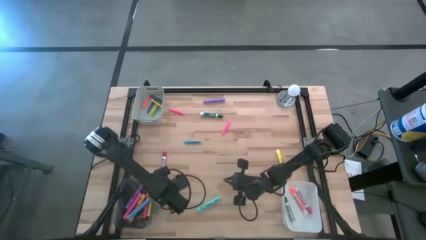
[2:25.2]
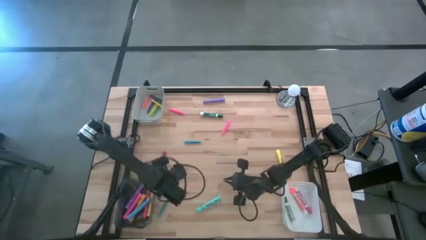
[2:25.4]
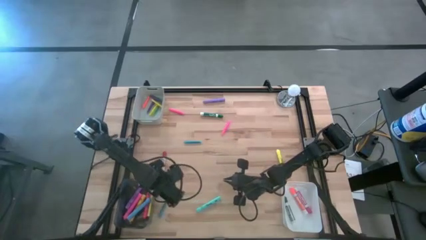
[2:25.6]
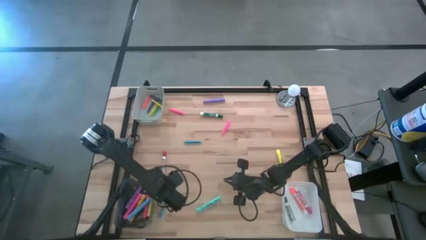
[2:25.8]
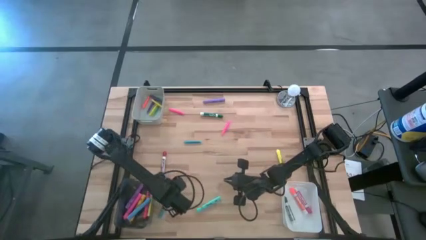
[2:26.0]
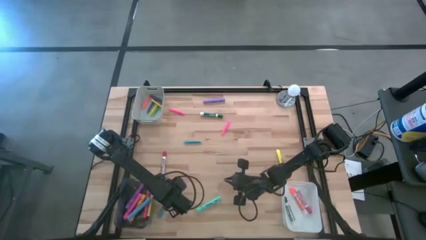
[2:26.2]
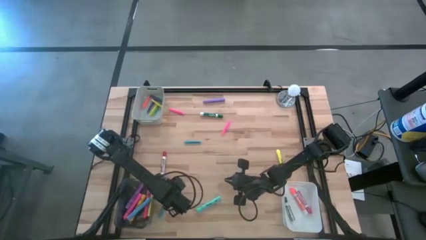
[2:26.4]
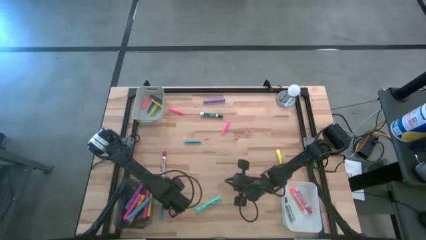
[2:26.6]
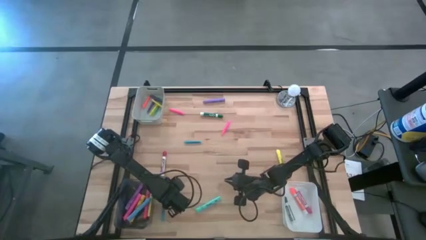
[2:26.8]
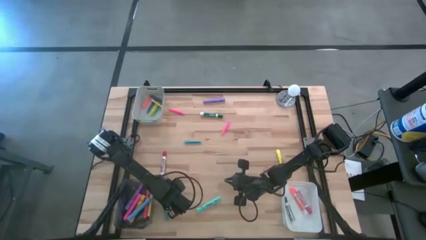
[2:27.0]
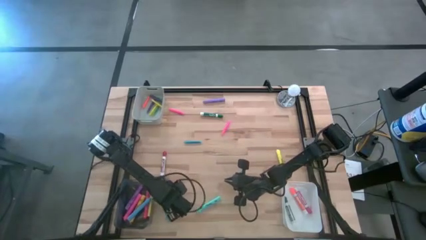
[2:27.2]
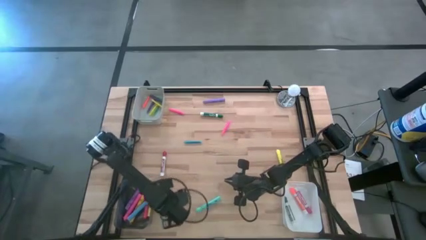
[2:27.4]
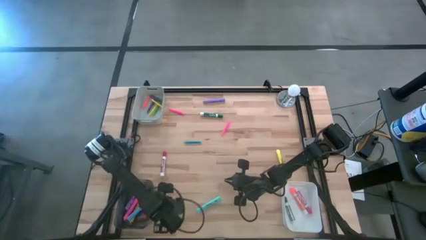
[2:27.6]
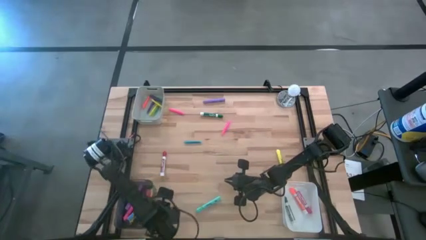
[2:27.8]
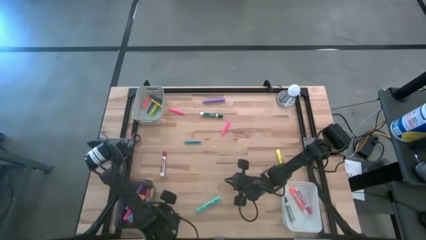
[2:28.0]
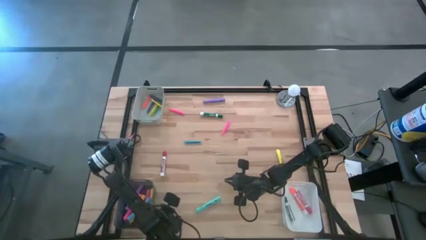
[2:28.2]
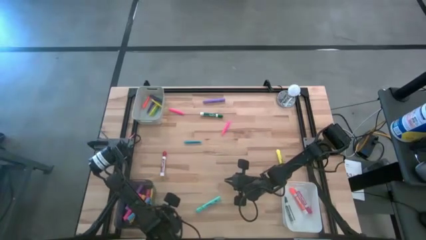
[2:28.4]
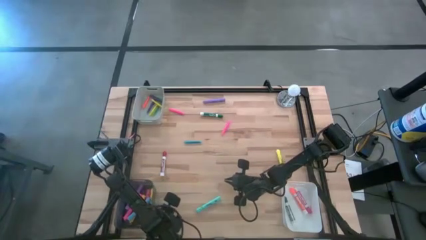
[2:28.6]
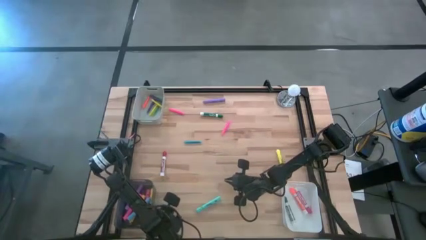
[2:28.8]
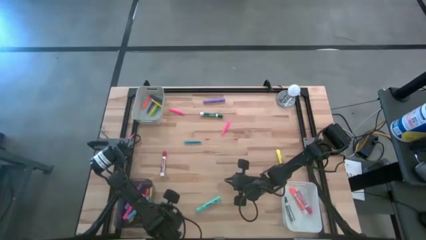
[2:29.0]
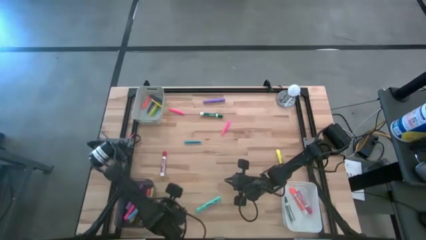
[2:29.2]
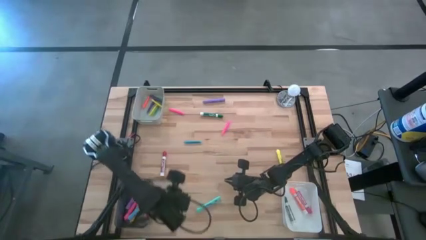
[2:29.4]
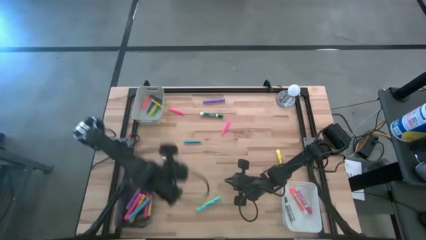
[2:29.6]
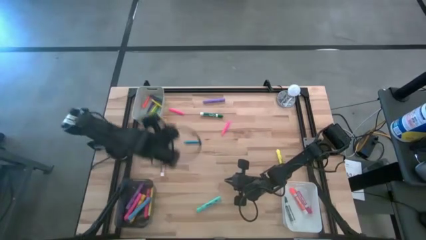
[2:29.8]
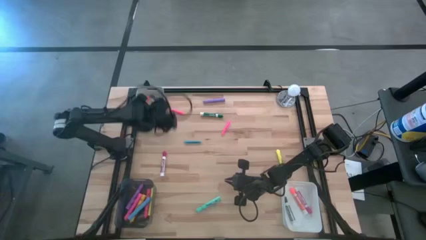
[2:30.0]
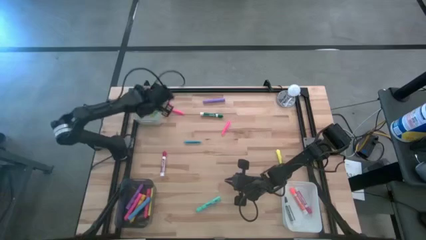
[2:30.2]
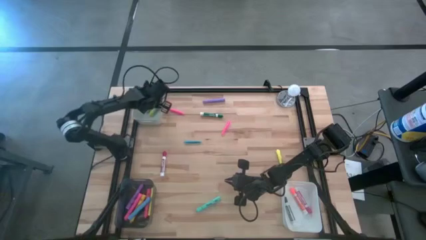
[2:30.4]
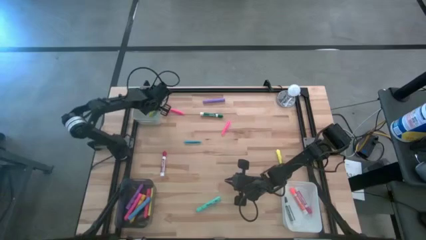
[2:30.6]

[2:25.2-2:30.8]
Task: Pick & Place Markers
Put the bottom blue pen into the gray bin

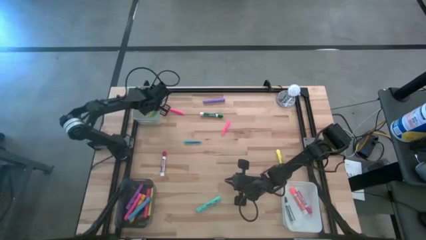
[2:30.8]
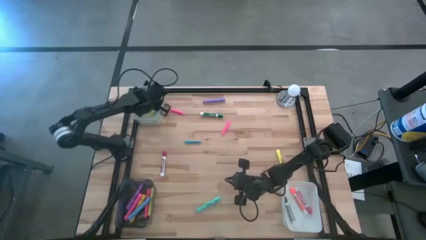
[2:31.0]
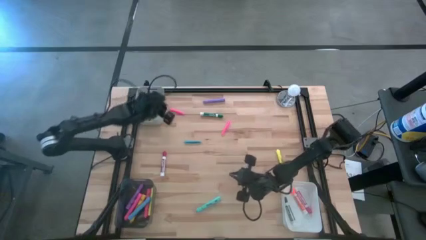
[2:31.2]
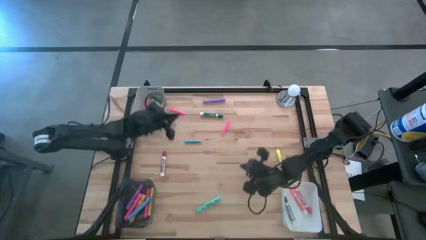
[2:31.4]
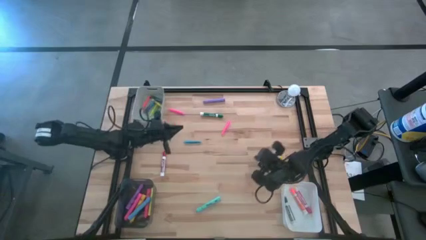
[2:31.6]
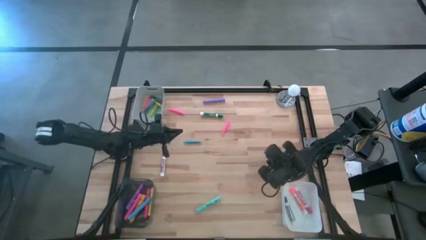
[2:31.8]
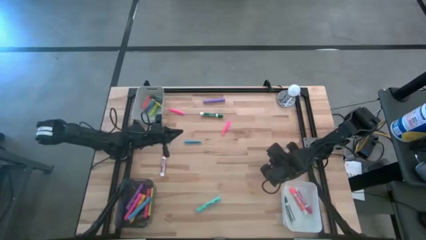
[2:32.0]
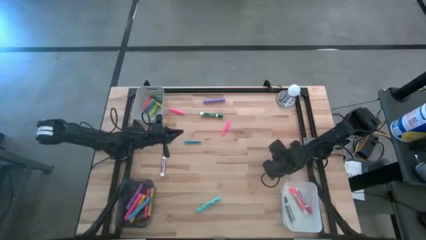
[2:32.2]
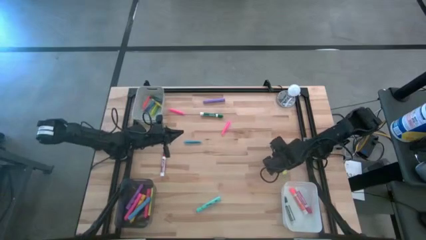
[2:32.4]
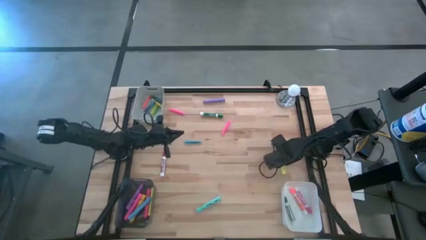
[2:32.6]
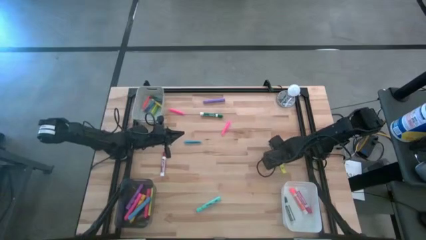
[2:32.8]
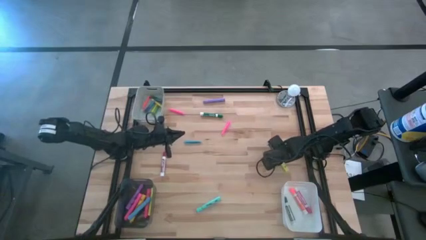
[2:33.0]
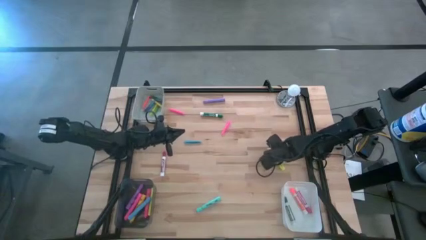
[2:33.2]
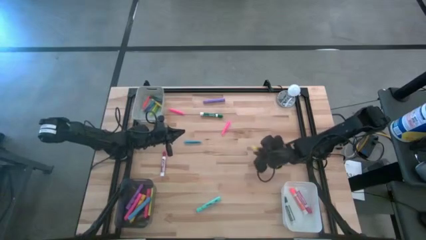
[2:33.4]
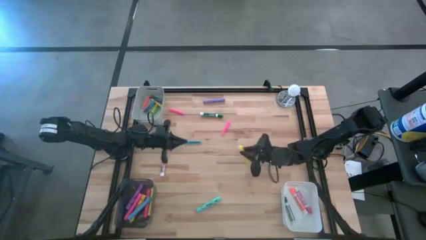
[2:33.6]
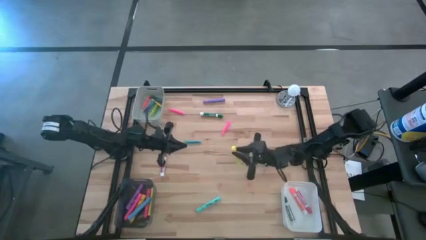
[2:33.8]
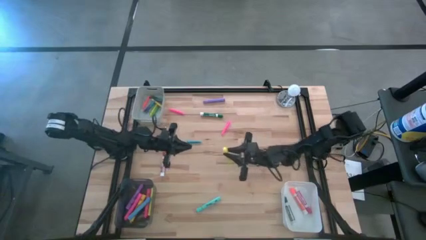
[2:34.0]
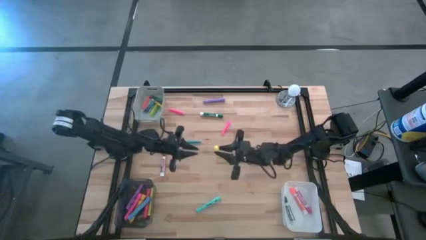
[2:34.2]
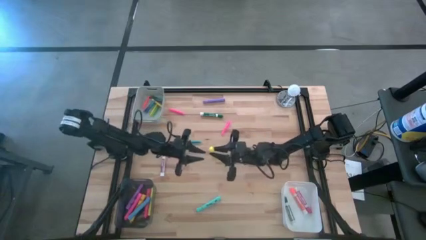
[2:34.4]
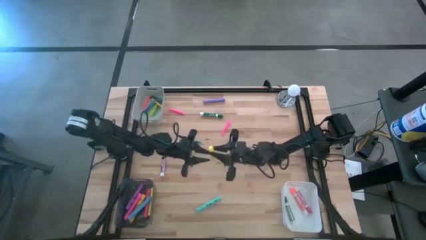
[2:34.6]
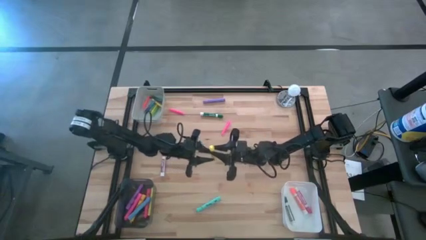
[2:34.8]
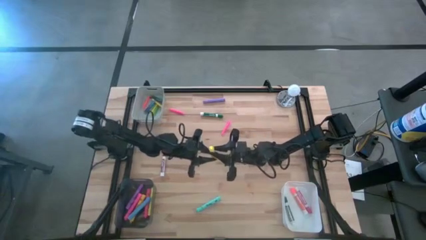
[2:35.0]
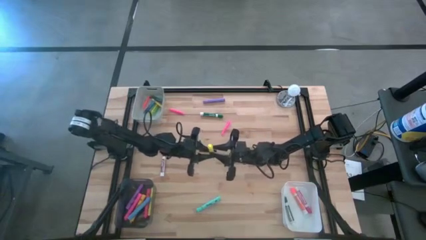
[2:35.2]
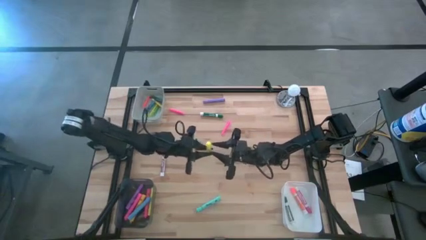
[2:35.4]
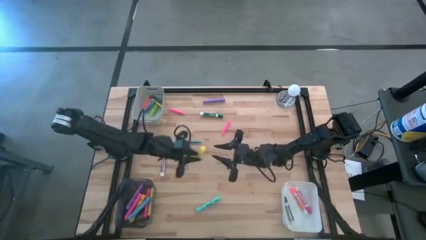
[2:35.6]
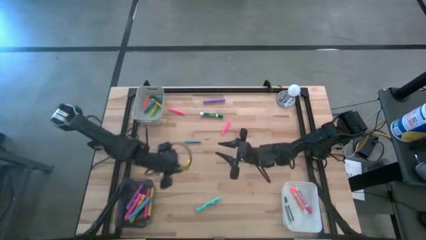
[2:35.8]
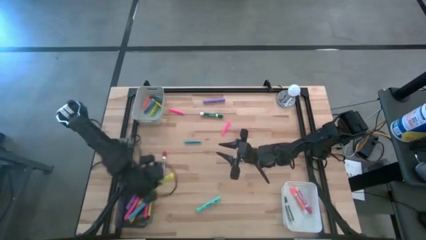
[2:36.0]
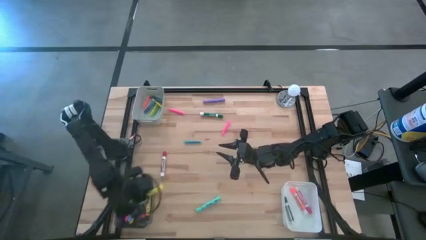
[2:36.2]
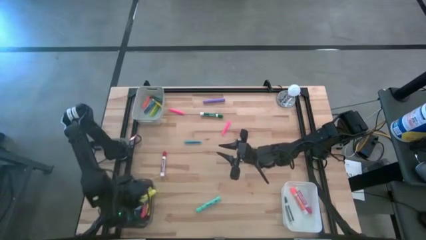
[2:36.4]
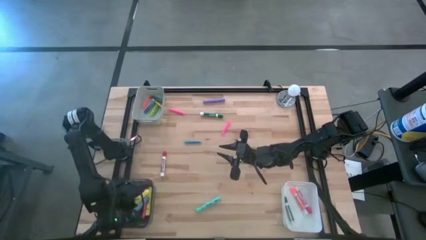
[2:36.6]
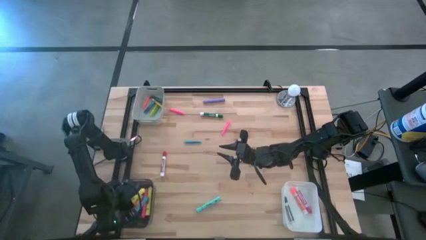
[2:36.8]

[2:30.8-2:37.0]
Put the left yellow highlighter pen into the black bin

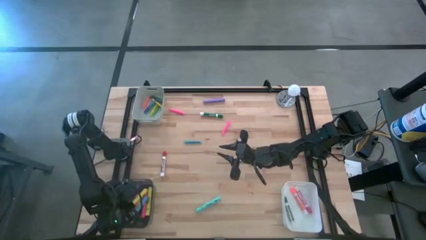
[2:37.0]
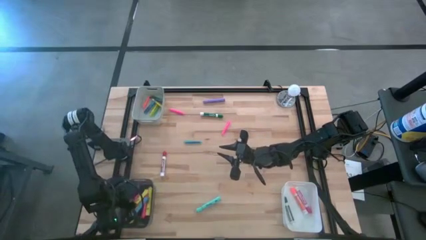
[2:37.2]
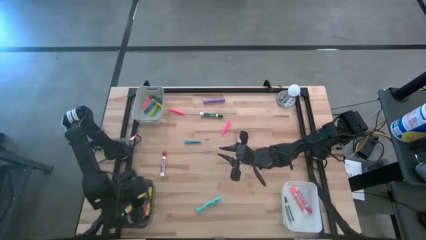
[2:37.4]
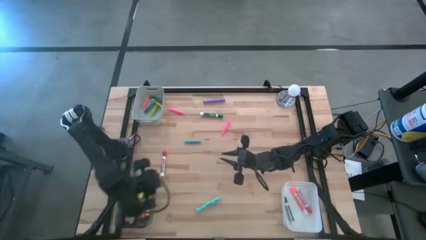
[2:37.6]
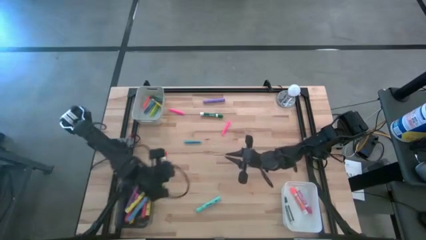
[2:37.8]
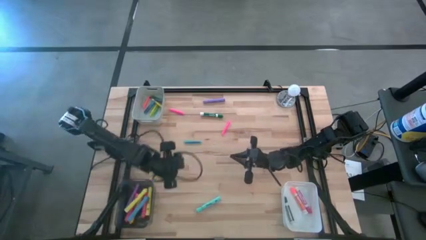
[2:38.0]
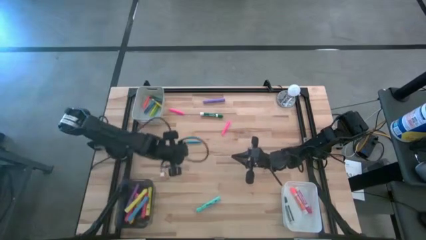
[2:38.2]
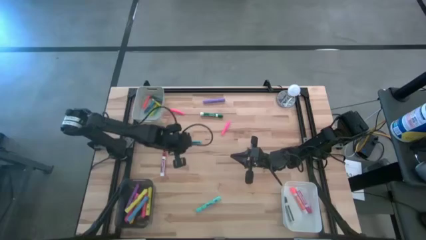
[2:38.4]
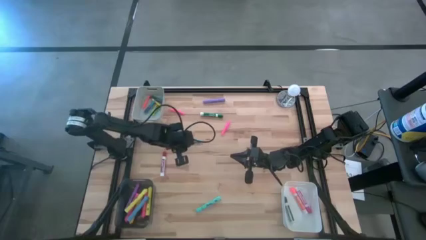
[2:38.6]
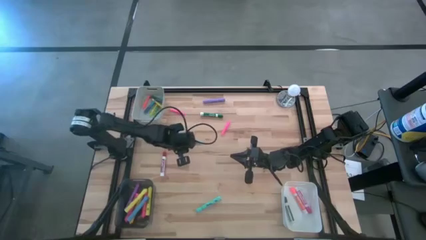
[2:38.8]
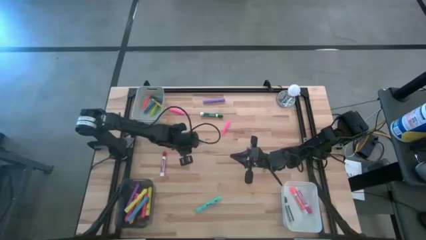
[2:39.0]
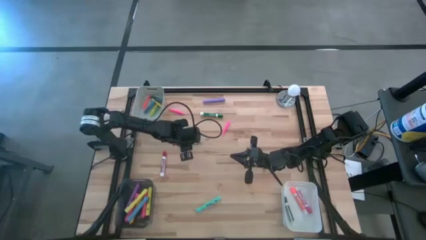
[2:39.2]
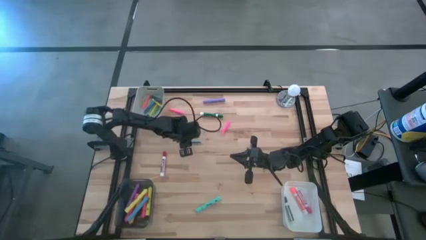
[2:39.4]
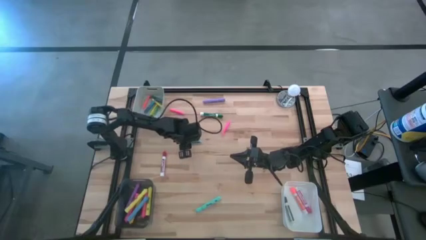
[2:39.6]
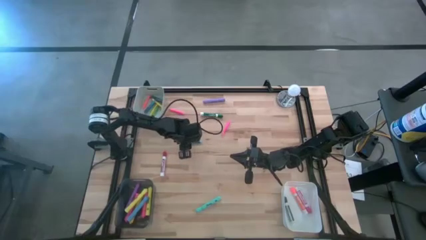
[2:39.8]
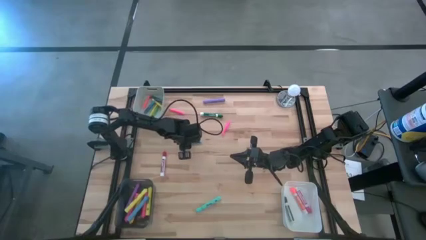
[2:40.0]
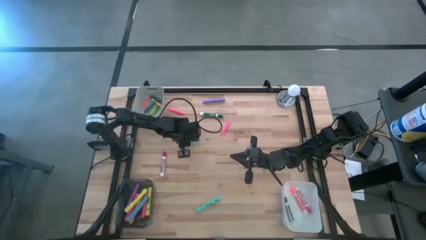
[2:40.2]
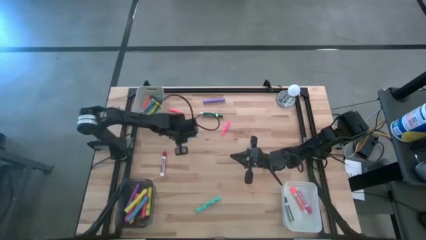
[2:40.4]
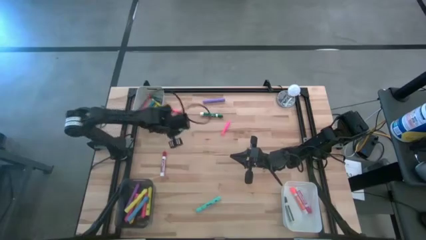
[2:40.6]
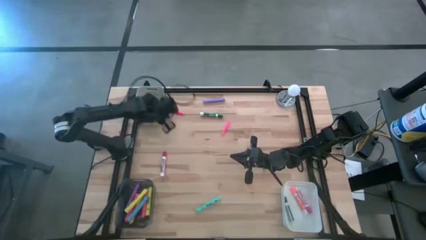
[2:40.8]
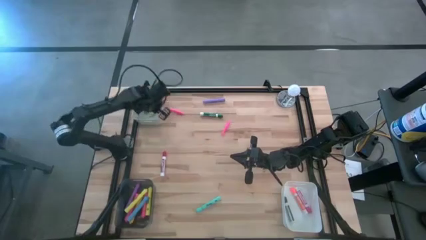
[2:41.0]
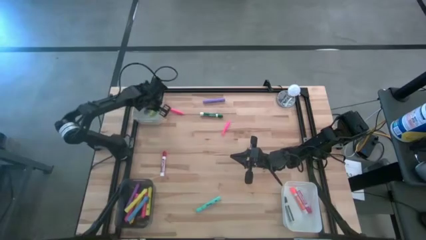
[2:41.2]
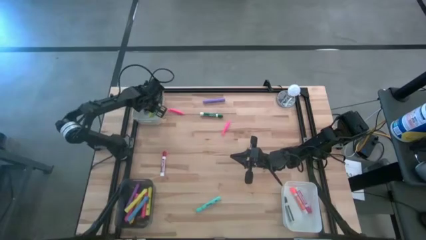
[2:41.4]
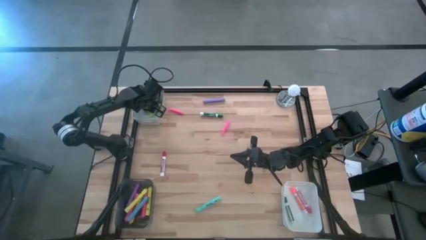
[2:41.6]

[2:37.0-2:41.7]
Put the blue pen into the gray bin
